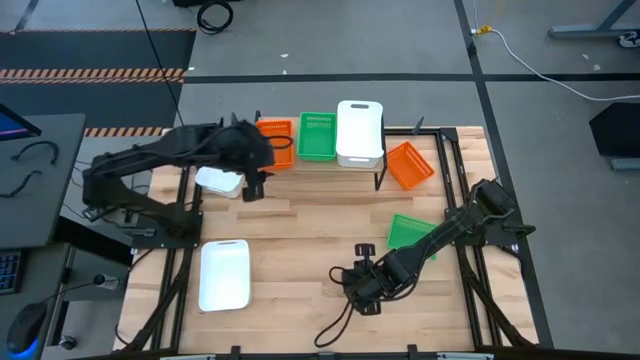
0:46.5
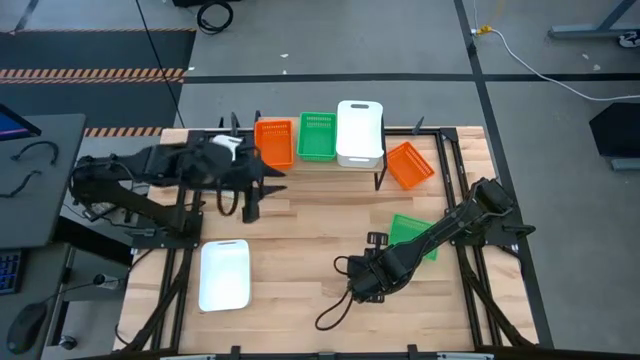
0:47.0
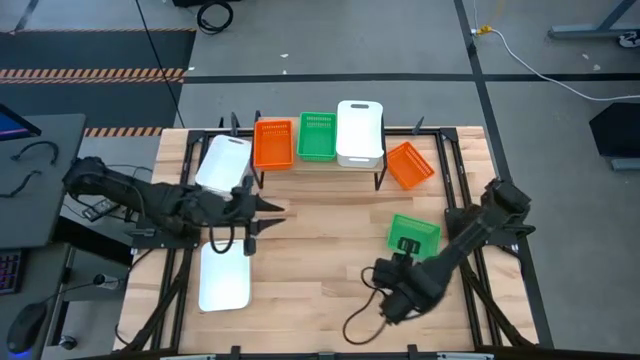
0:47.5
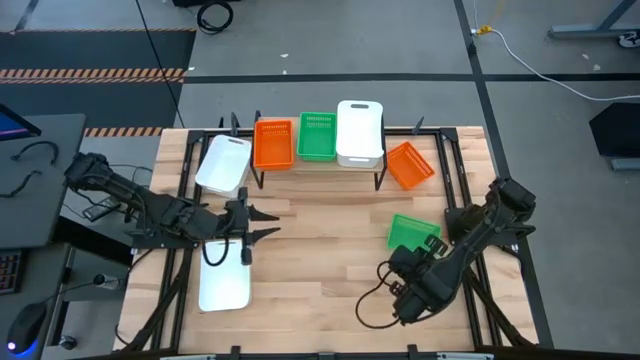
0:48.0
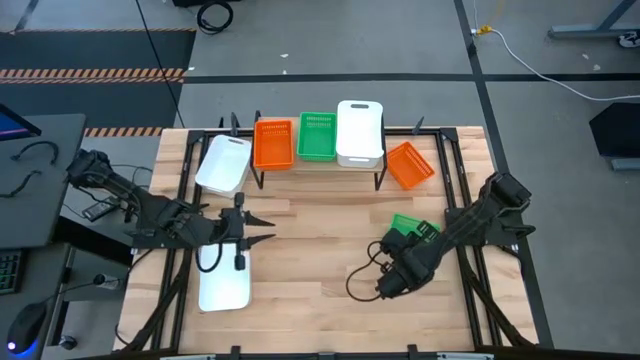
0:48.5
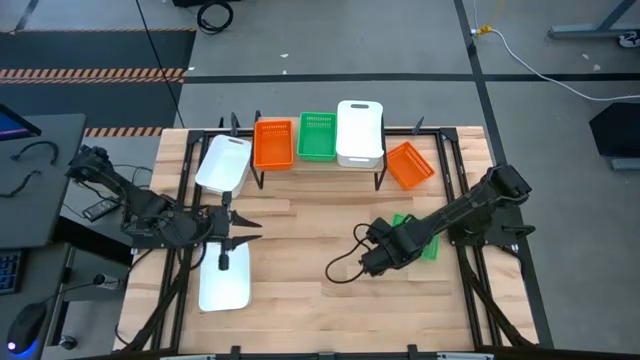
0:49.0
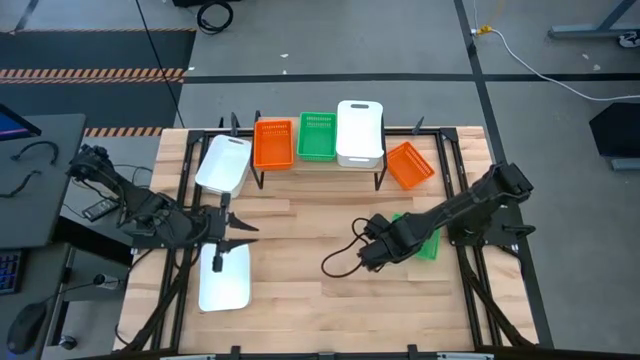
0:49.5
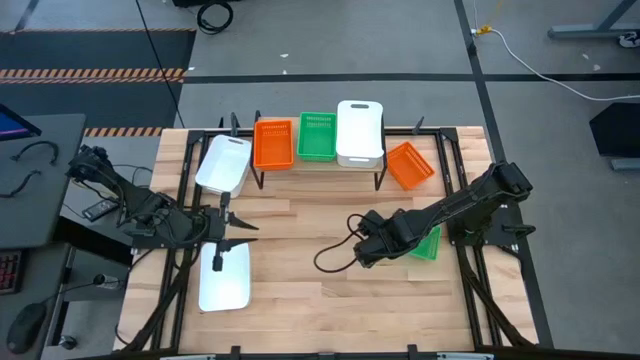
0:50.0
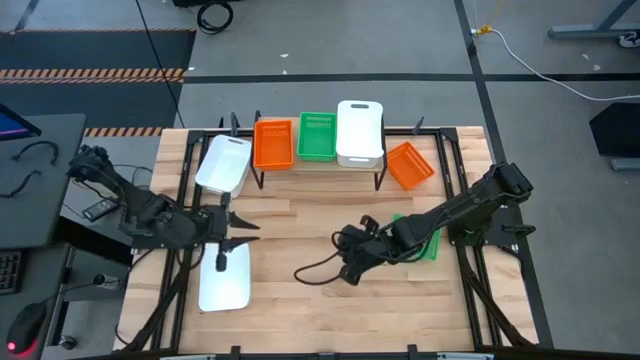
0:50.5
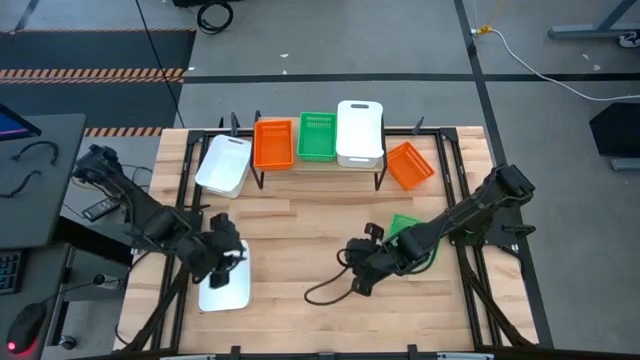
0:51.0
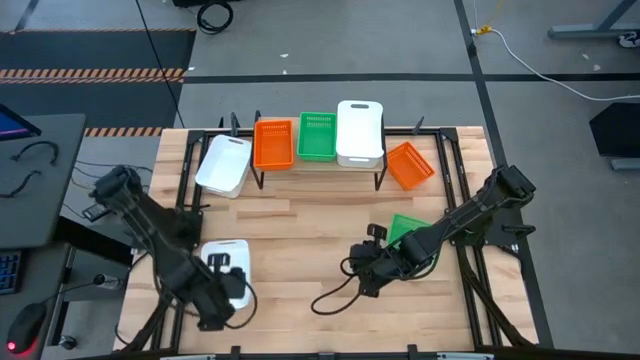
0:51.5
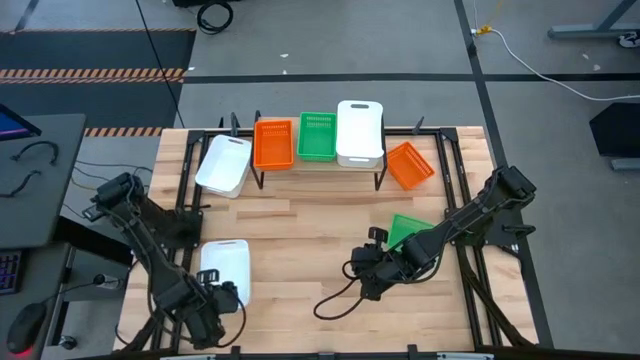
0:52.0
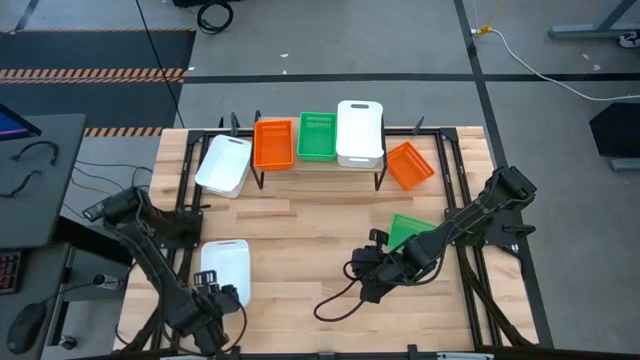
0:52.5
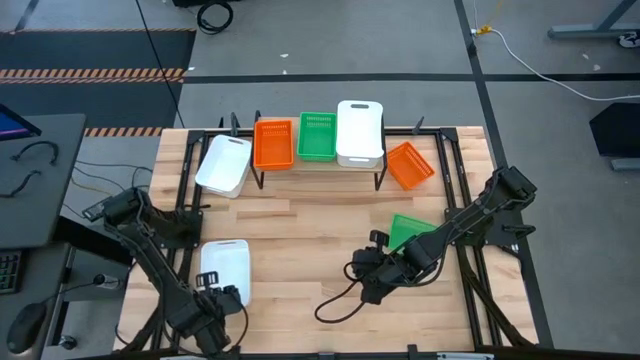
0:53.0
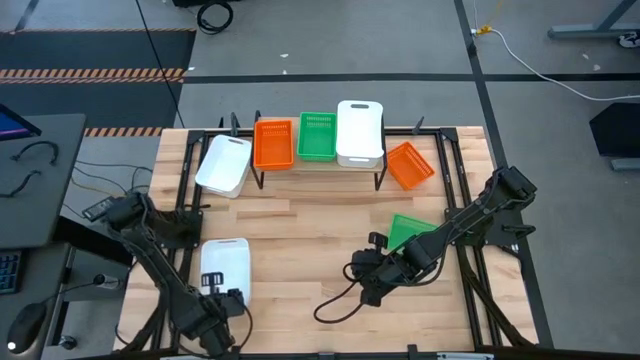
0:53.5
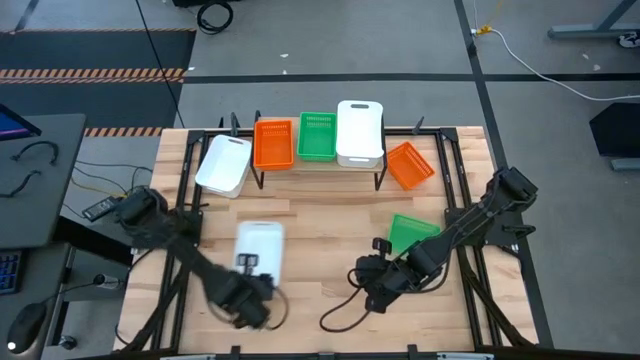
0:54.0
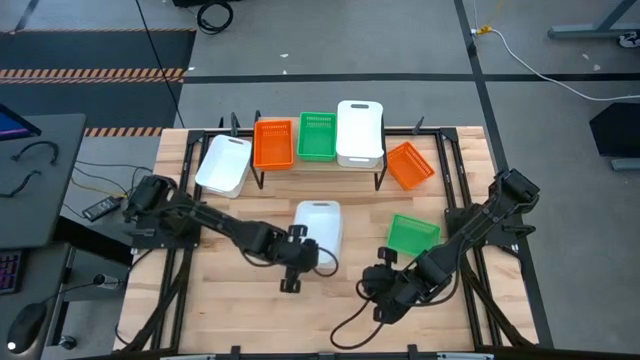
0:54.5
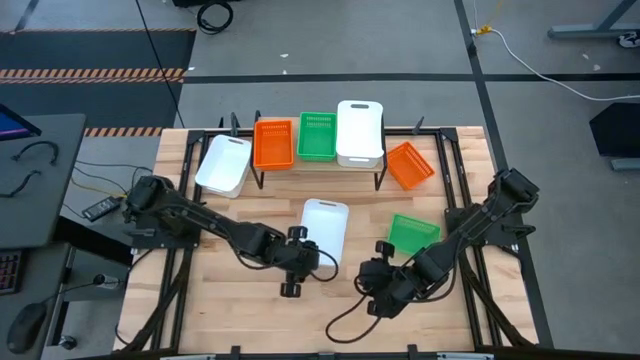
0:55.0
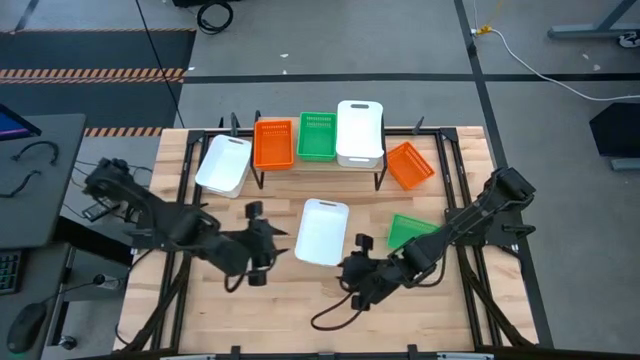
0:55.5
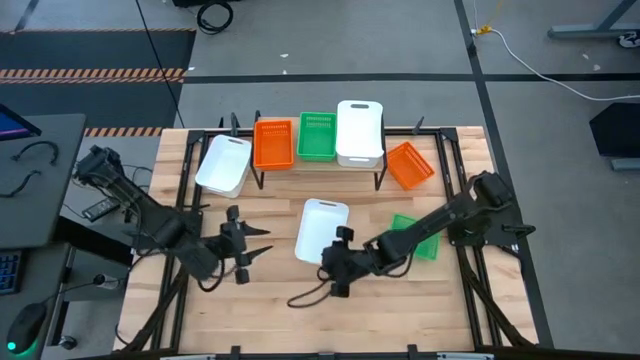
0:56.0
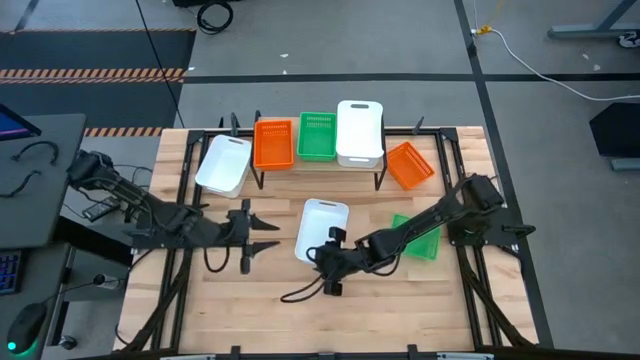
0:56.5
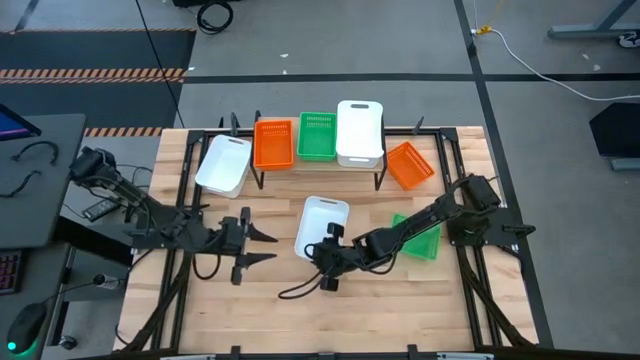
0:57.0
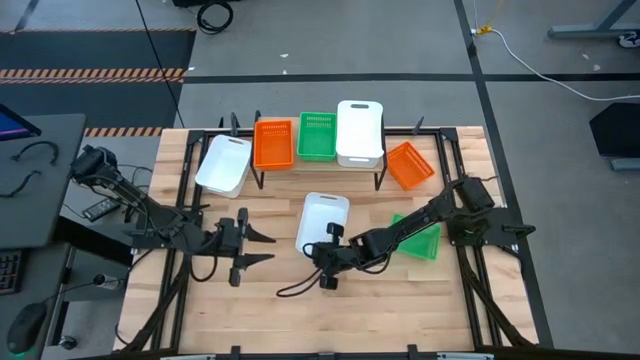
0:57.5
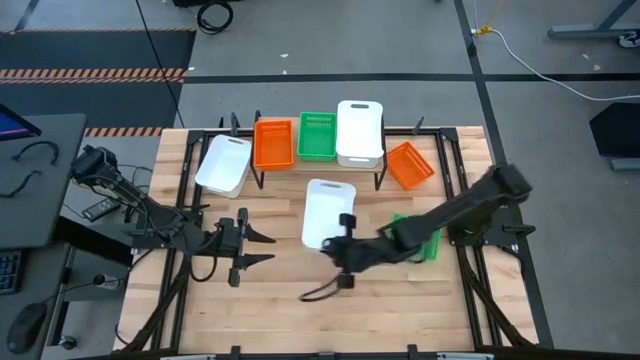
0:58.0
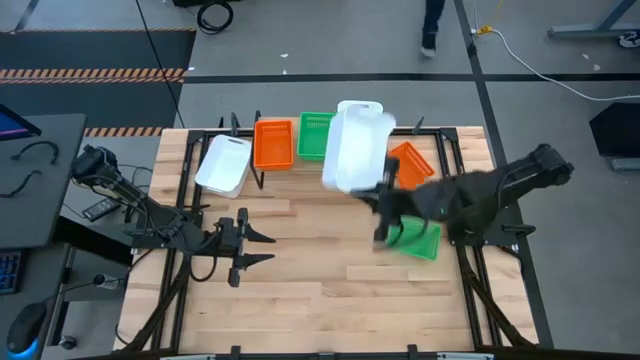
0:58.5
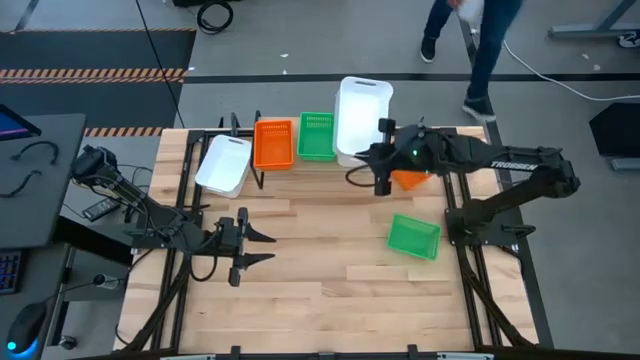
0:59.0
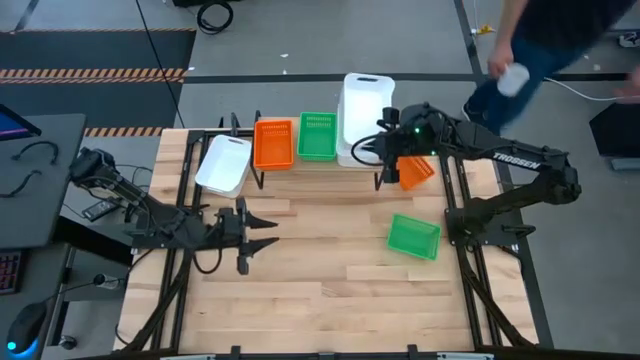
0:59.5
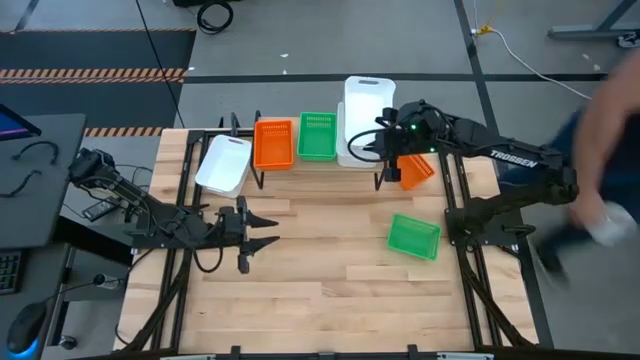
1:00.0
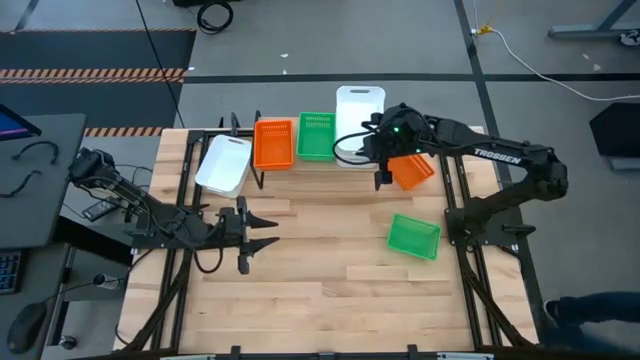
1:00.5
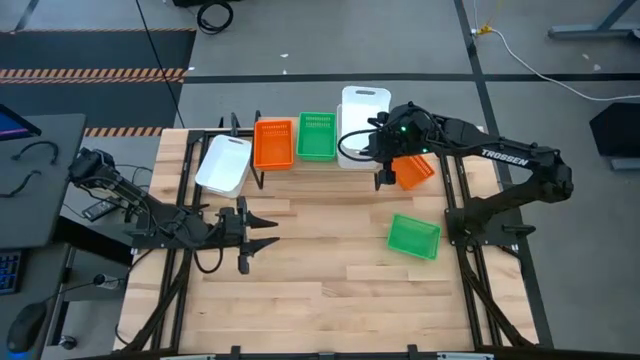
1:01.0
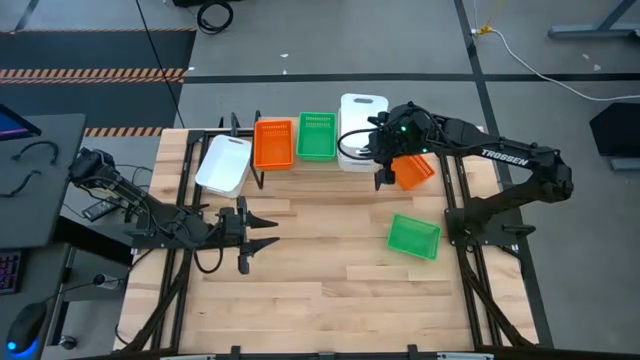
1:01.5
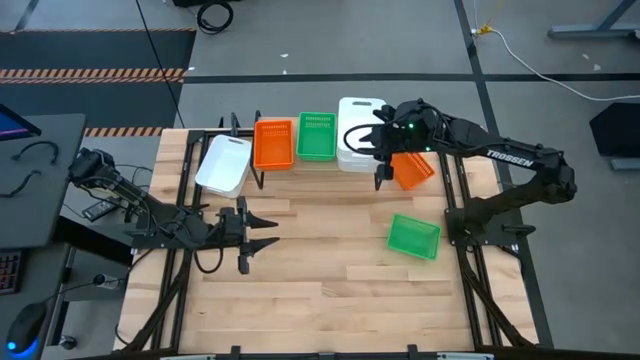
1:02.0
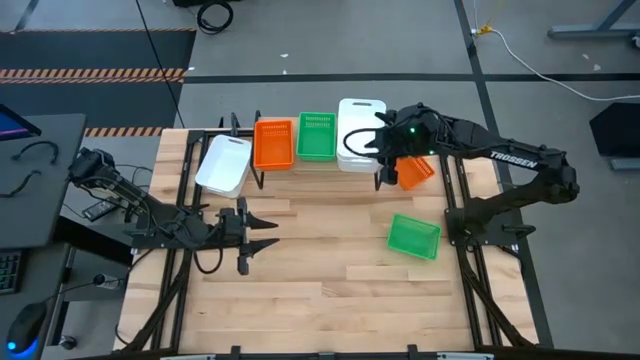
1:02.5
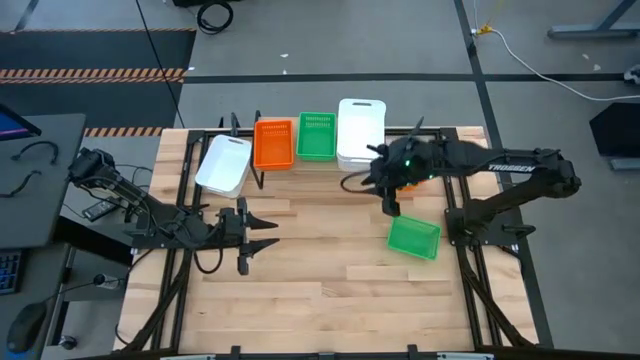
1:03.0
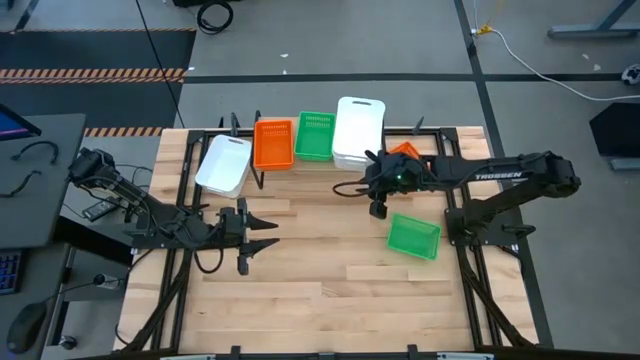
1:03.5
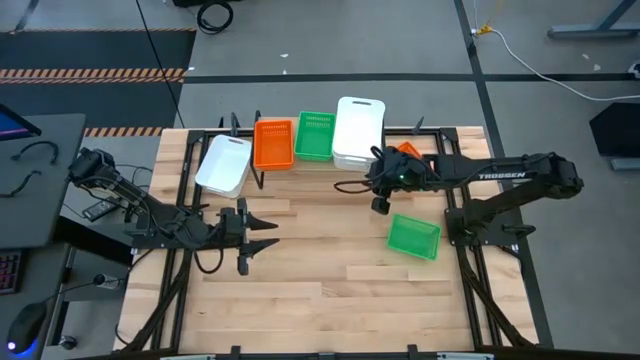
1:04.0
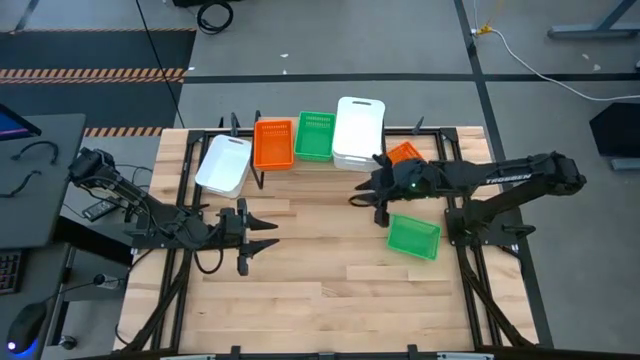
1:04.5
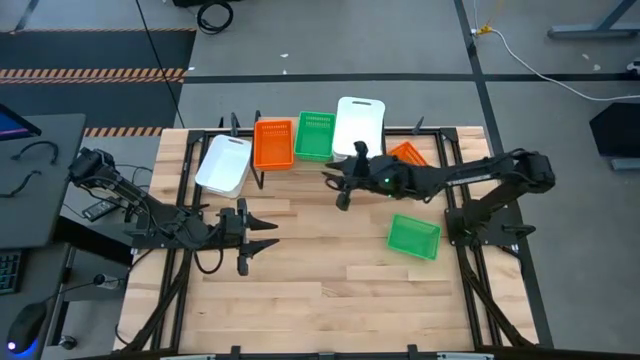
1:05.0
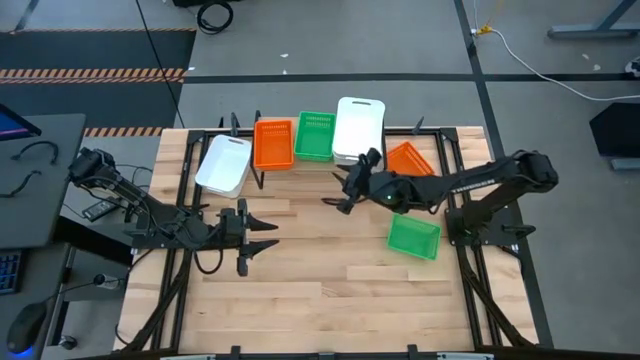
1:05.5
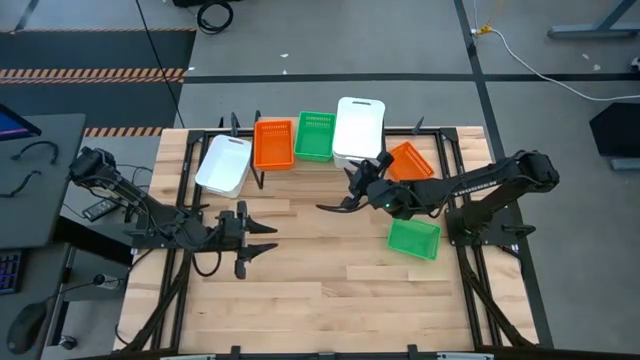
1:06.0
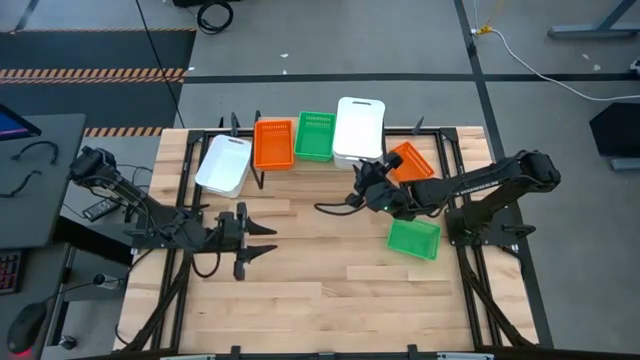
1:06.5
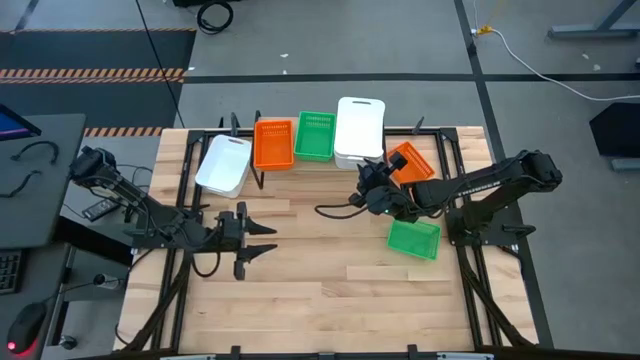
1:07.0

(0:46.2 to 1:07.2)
Task: Stack baskets on shelf by color
Stack the bottom white bin on top of the white bin on the shelf
